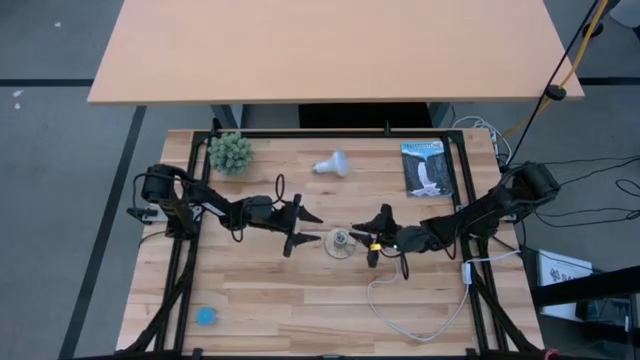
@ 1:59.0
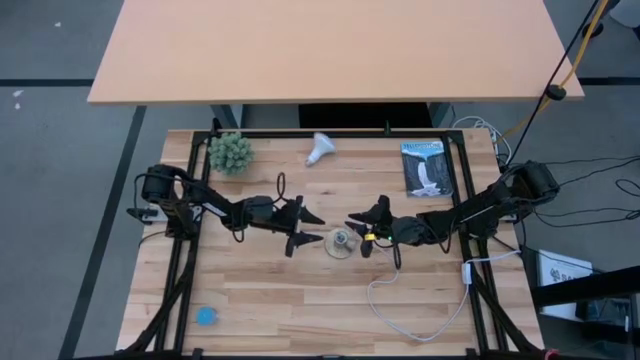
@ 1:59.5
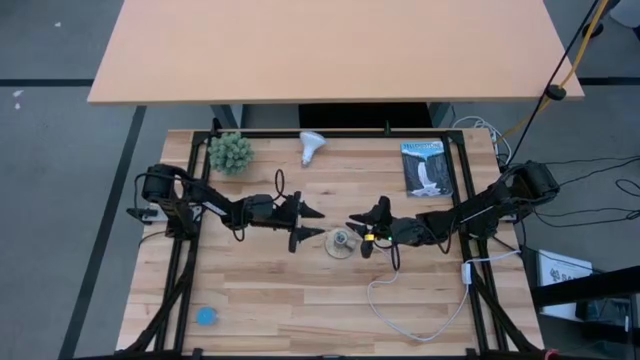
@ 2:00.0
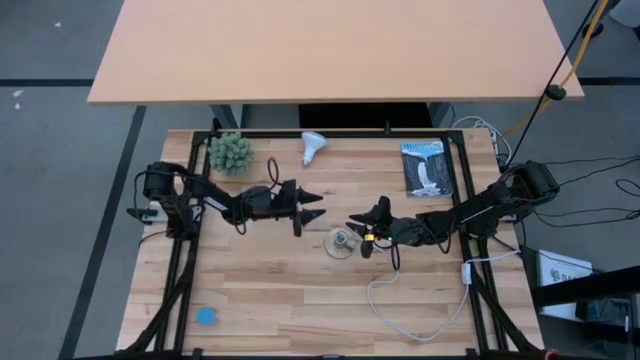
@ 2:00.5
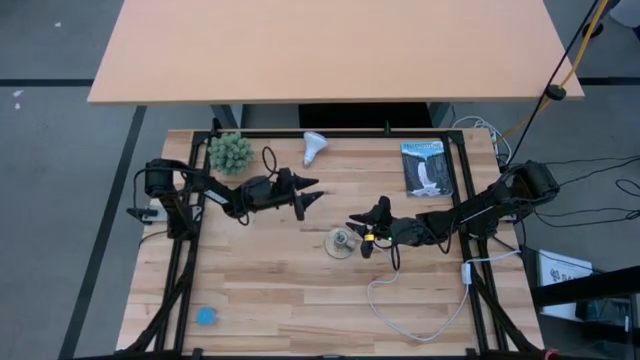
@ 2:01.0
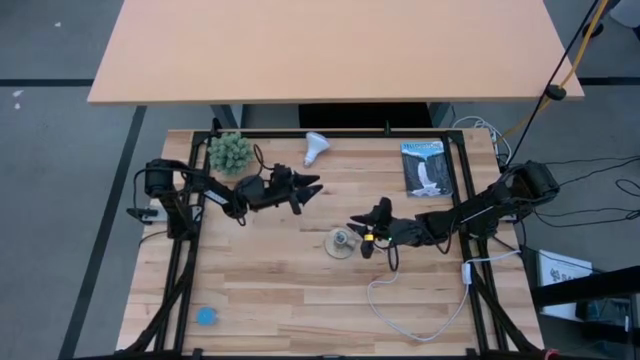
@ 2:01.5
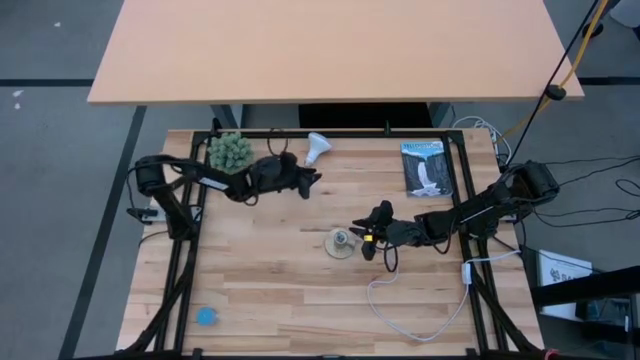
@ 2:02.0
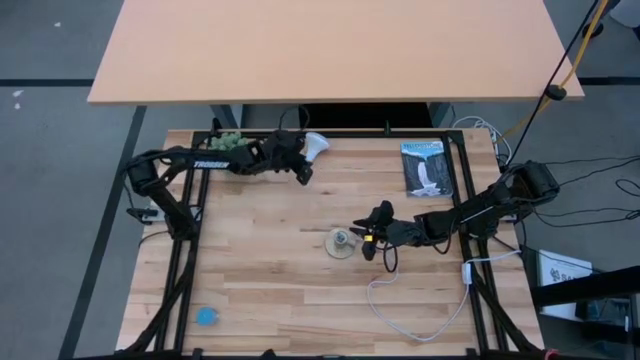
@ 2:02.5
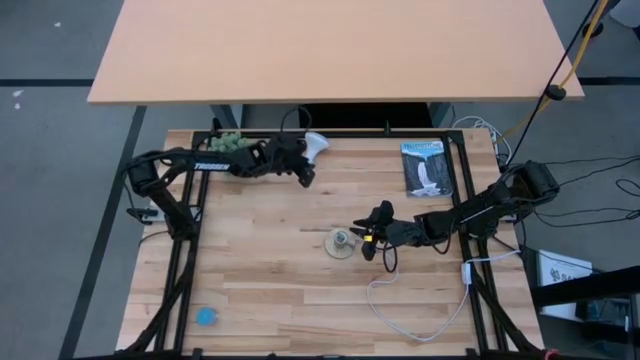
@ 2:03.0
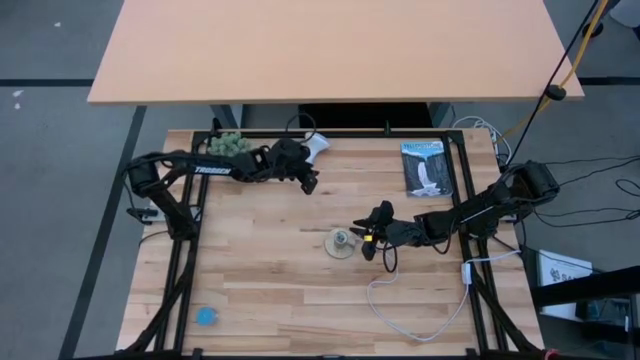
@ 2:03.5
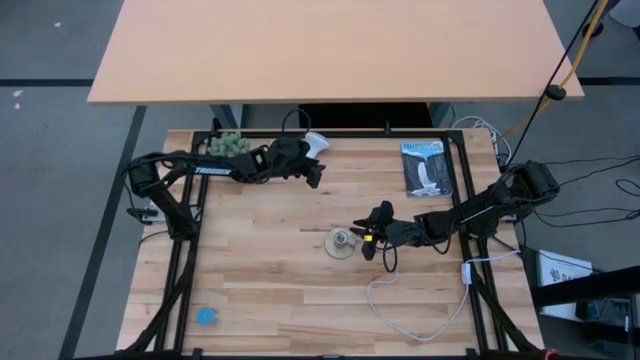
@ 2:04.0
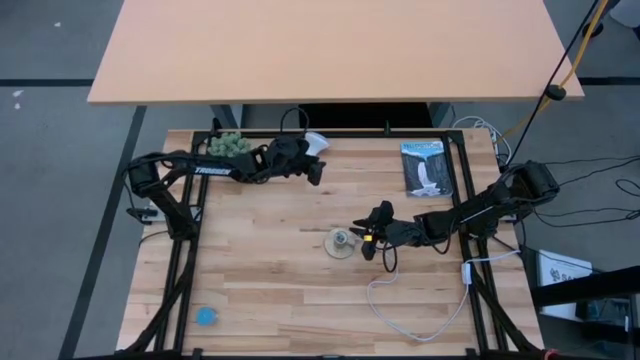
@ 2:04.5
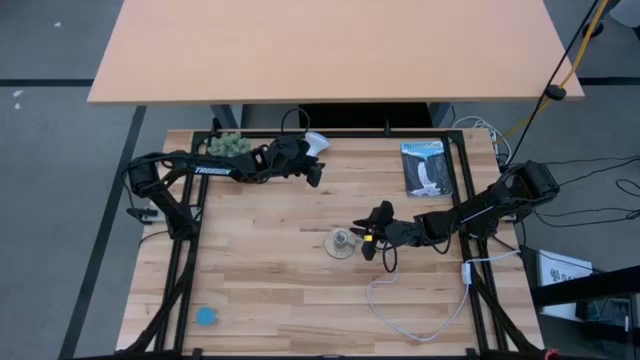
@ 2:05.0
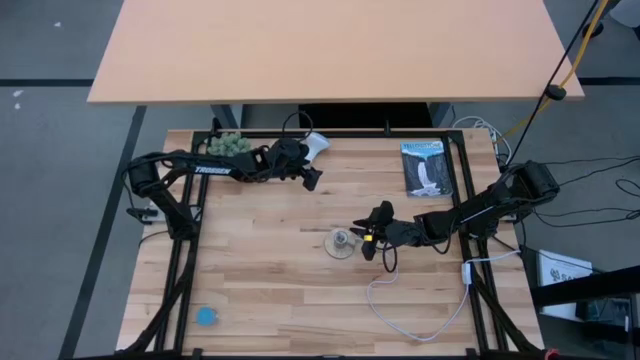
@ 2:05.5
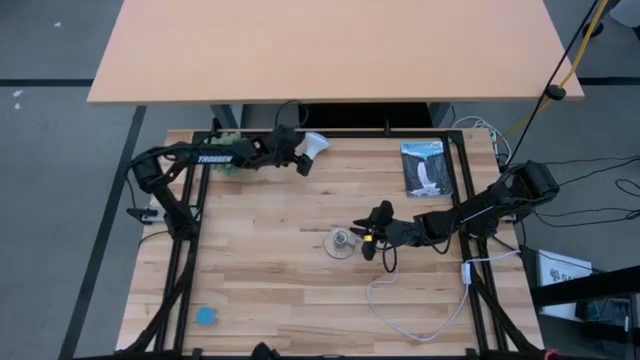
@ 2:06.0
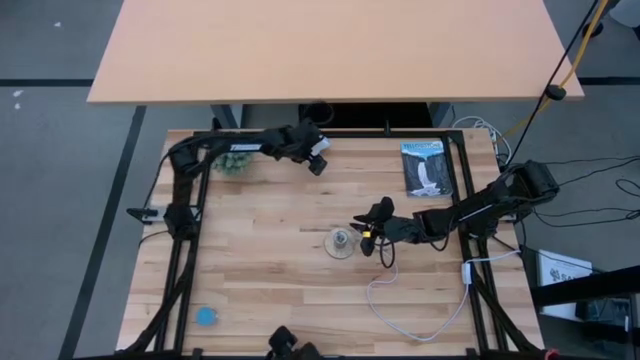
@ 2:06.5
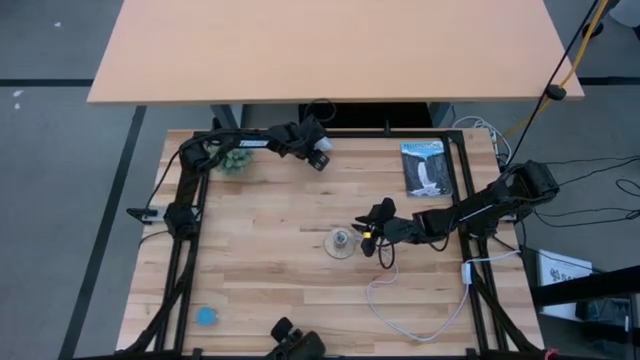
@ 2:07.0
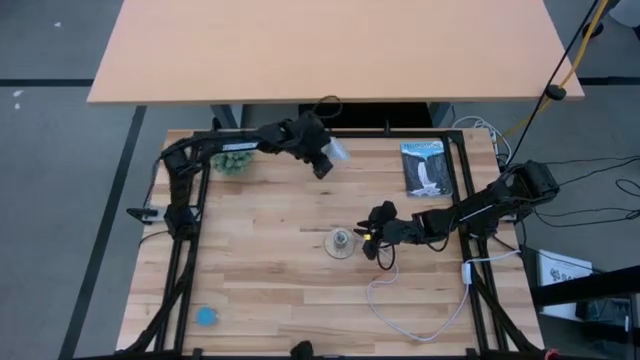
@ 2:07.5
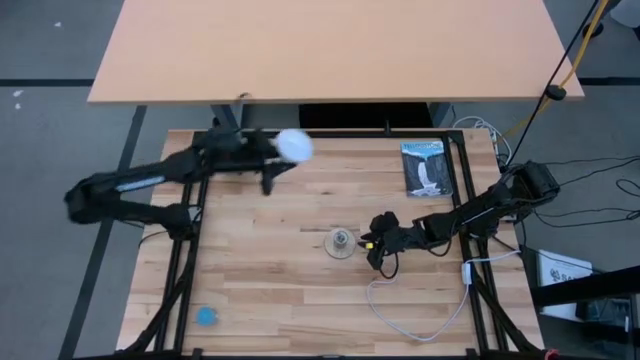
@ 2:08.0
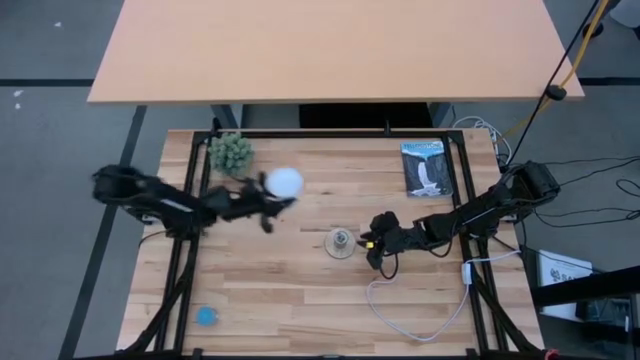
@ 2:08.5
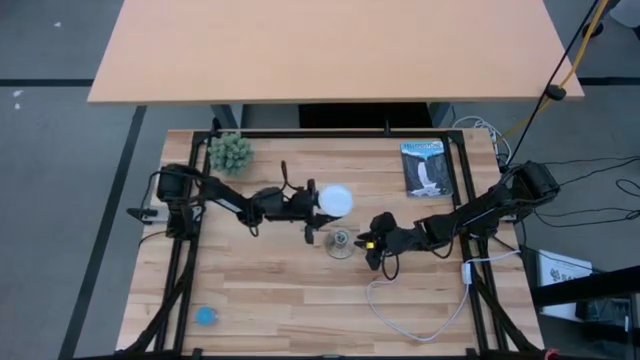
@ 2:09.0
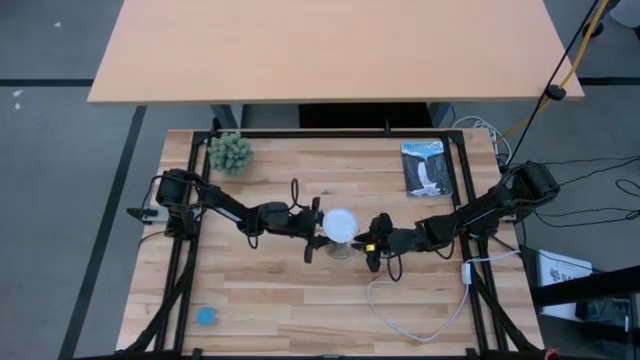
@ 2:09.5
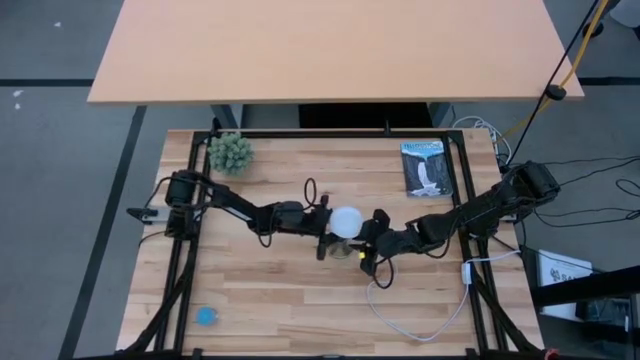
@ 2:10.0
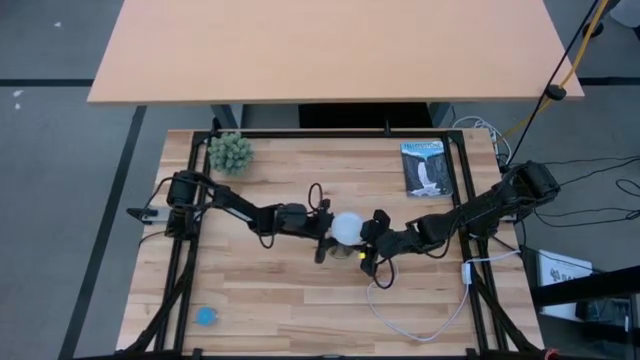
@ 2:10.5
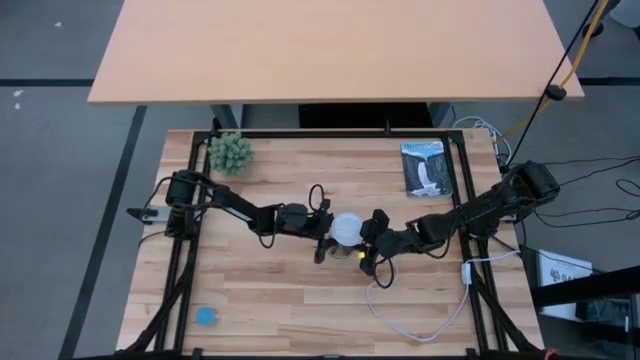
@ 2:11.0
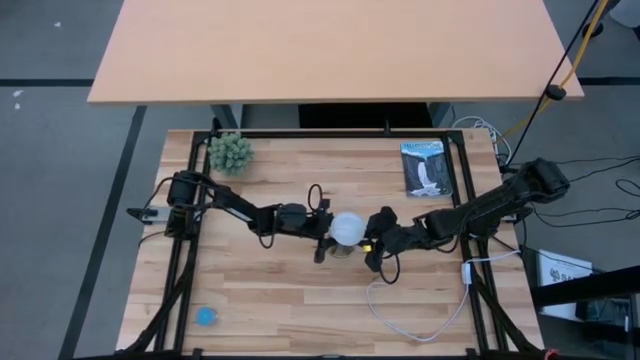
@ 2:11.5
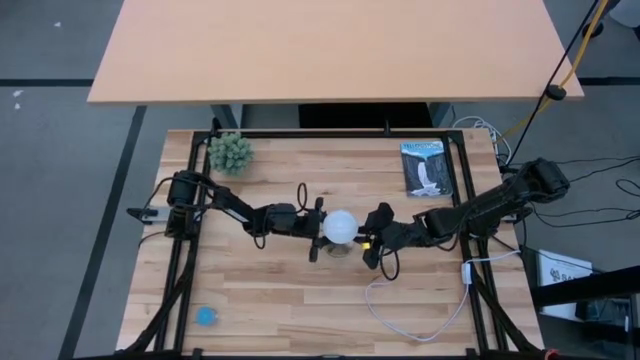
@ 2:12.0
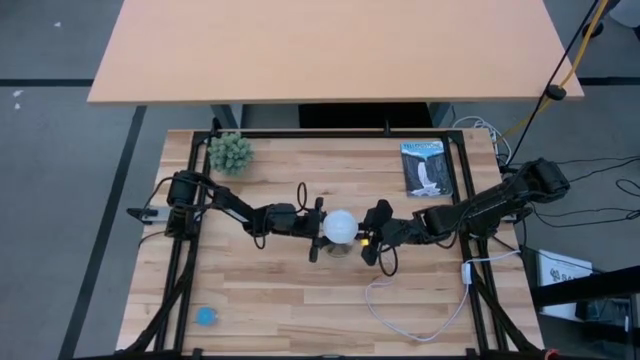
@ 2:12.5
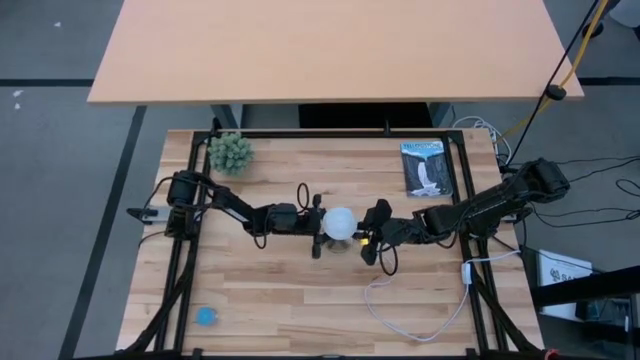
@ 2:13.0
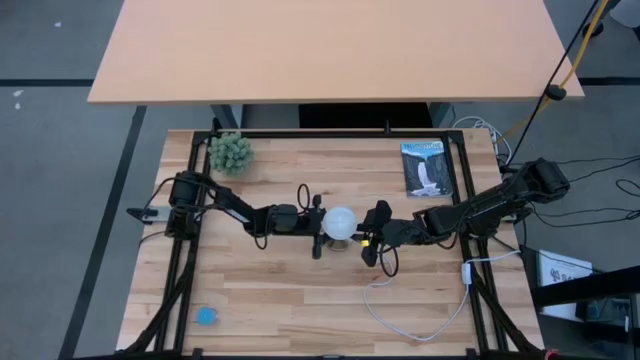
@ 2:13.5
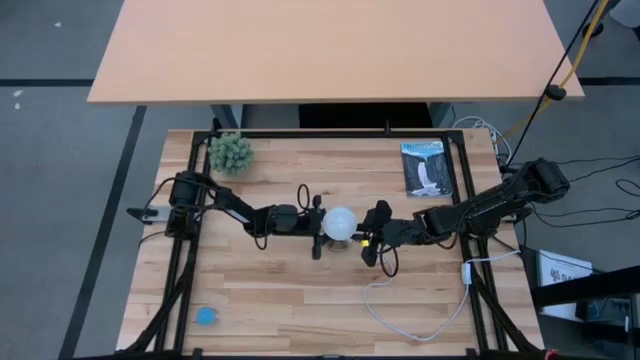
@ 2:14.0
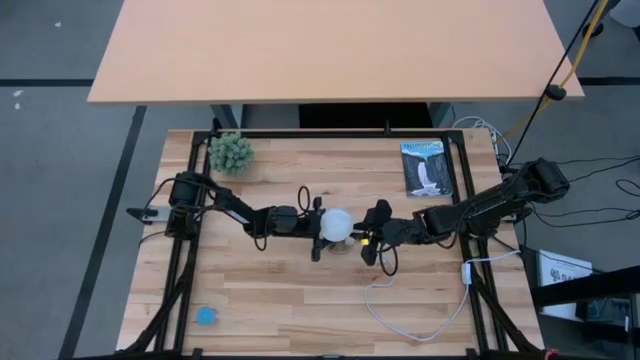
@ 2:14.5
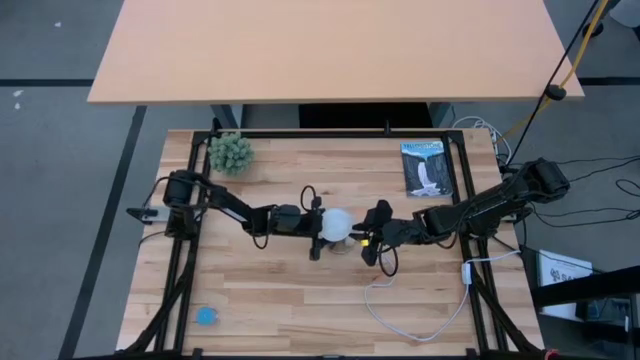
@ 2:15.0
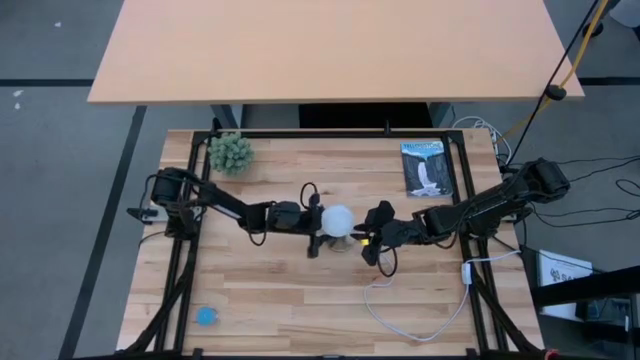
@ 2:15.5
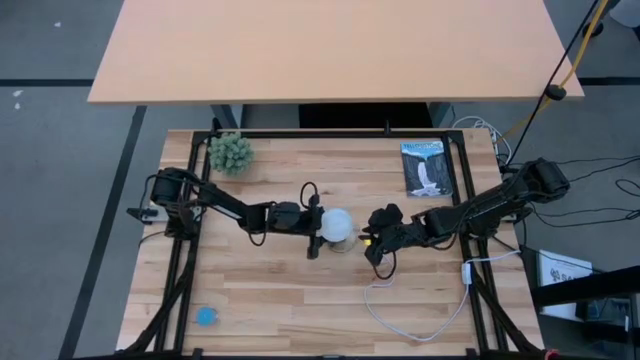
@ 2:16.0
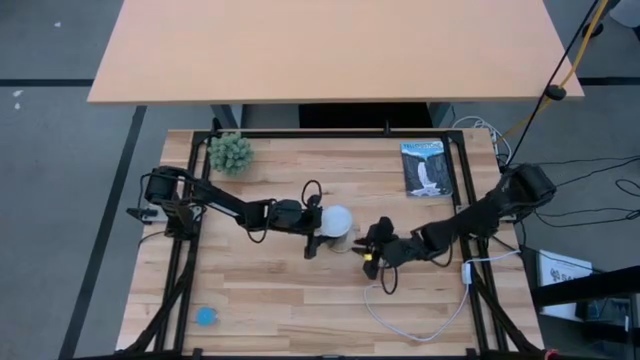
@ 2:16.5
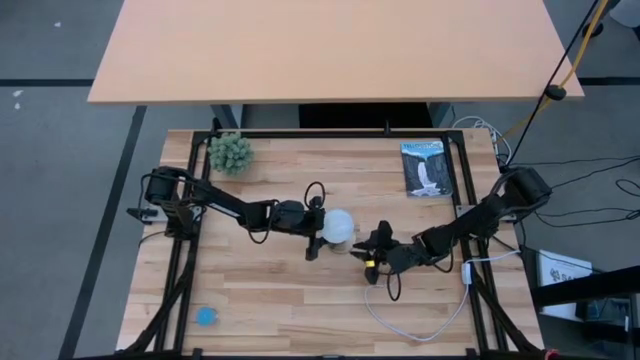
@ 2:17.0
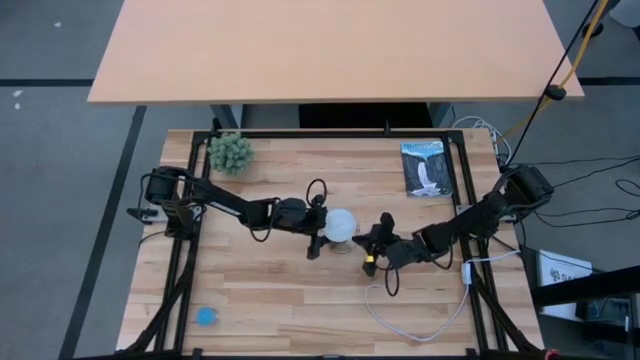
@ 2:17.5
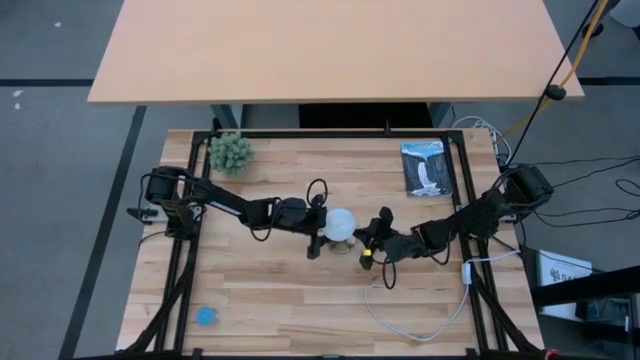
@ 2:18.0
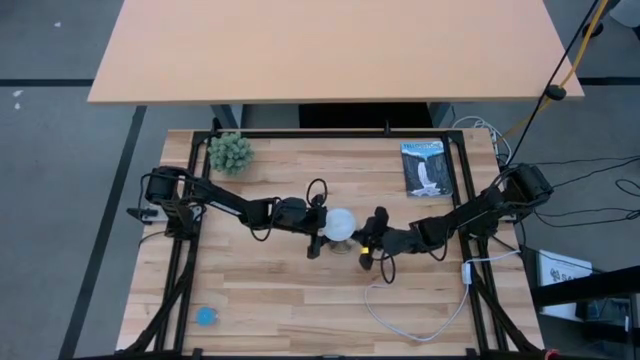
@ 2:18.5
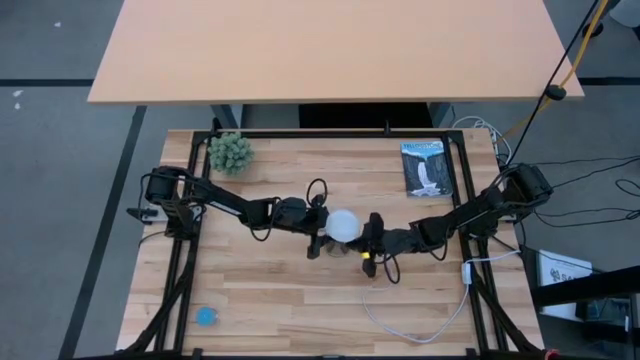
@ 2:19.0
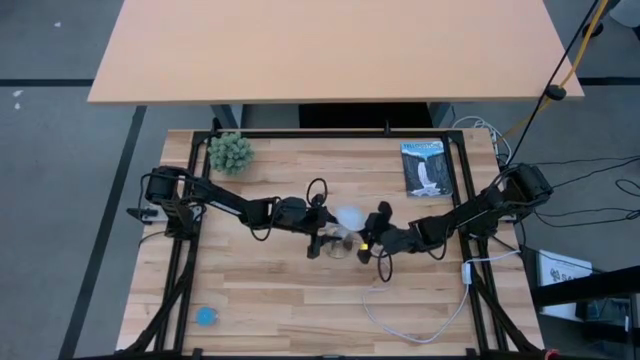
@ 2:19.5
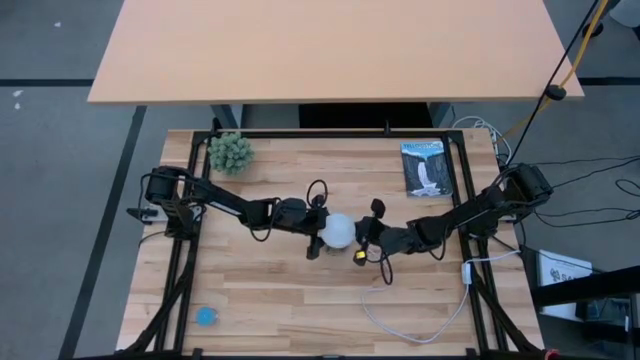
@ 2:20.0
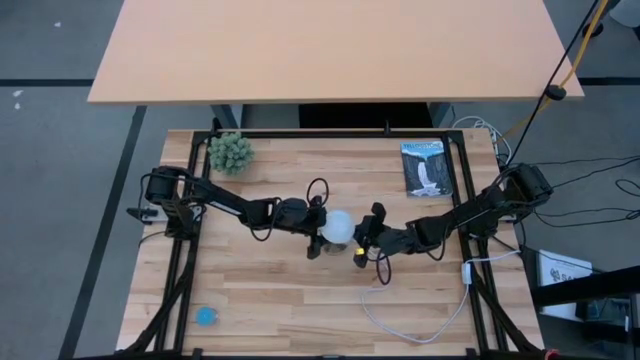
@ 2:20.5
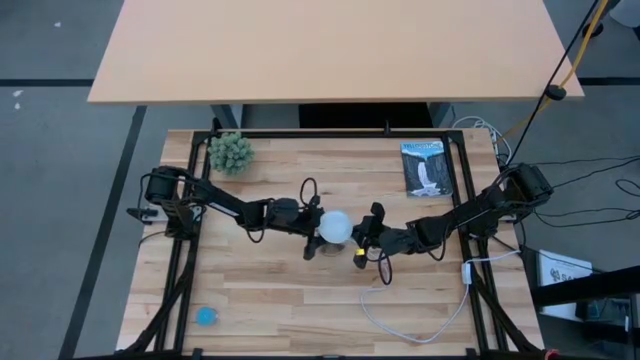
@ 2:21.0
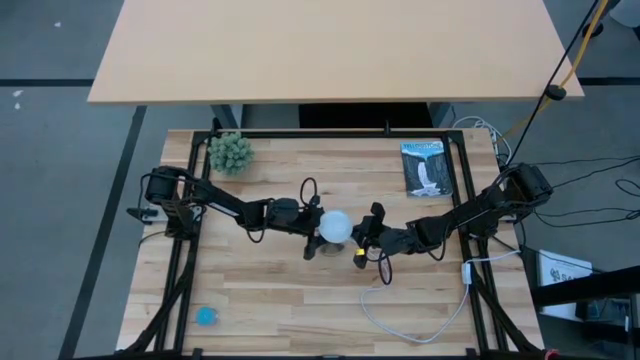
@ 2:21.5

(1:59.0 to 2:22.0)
Task: Screw lightbulb
Insert the white light bulb into the gold lamp
